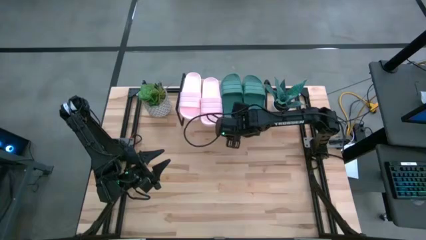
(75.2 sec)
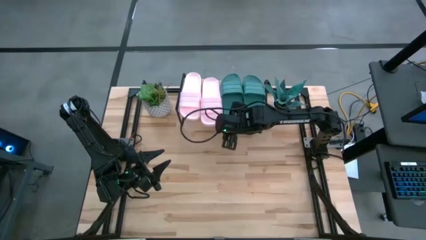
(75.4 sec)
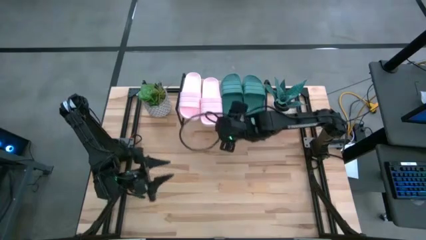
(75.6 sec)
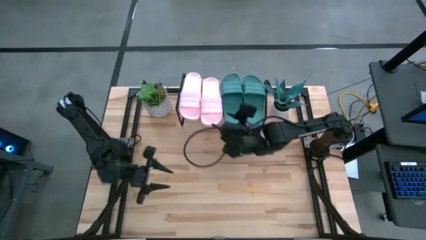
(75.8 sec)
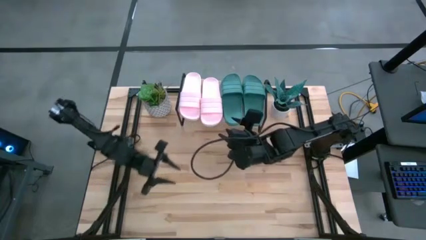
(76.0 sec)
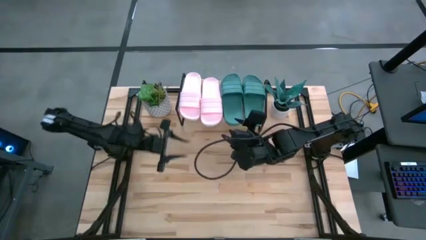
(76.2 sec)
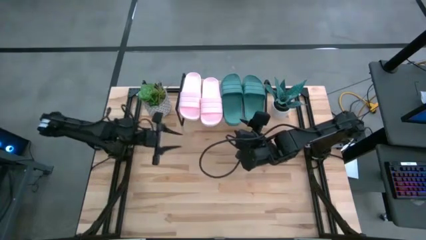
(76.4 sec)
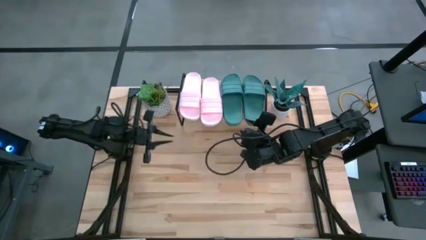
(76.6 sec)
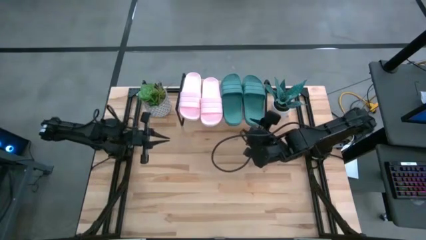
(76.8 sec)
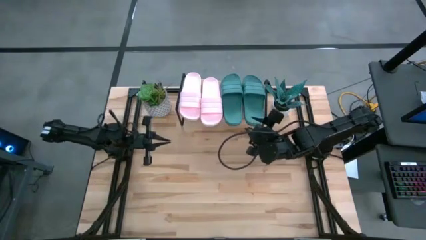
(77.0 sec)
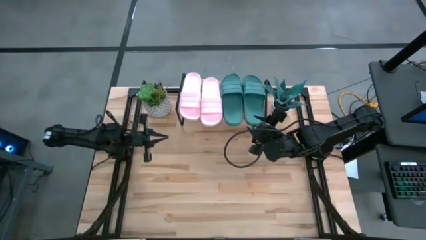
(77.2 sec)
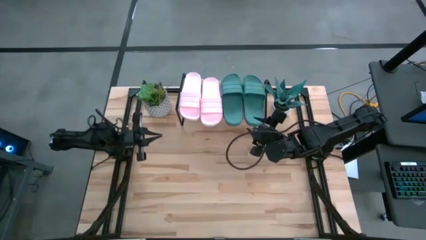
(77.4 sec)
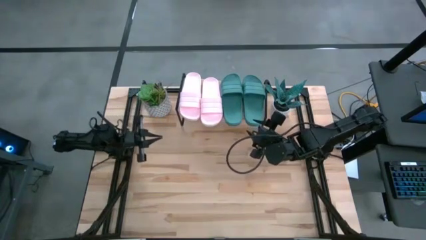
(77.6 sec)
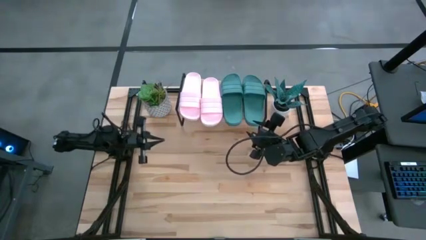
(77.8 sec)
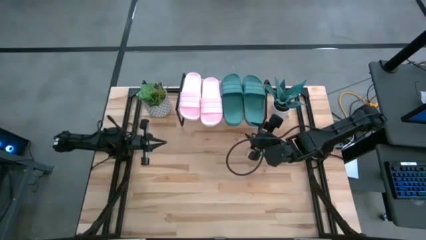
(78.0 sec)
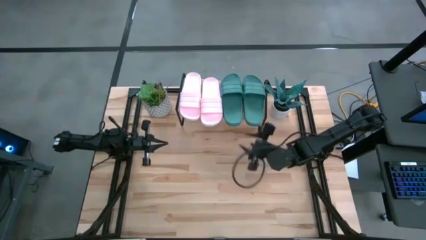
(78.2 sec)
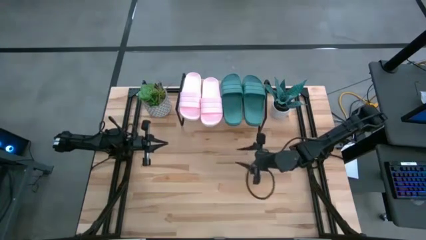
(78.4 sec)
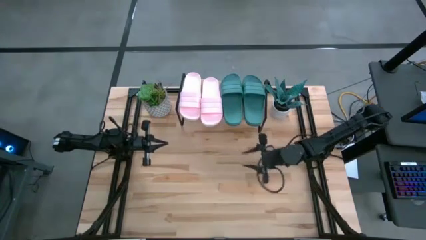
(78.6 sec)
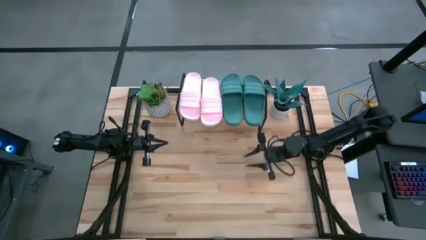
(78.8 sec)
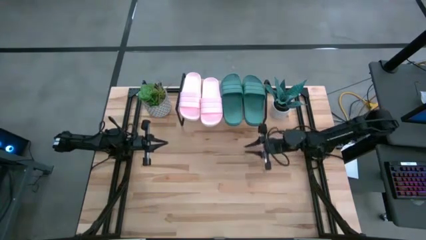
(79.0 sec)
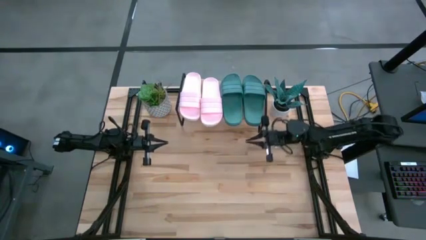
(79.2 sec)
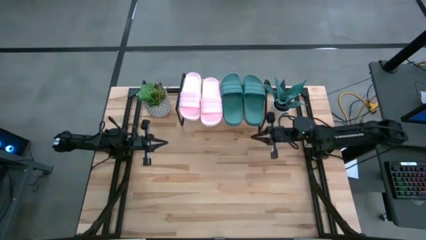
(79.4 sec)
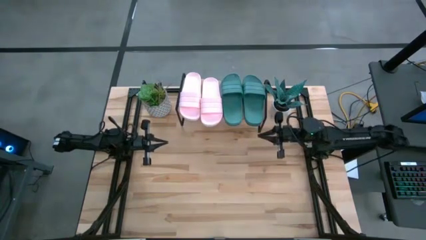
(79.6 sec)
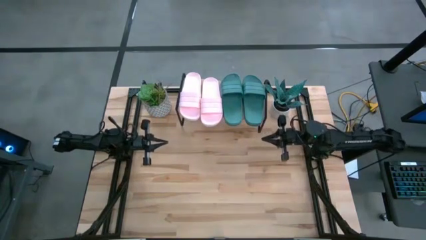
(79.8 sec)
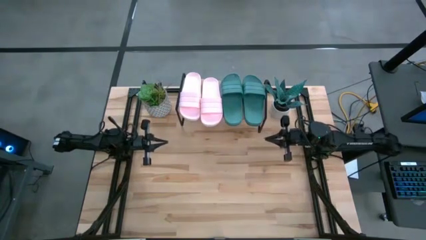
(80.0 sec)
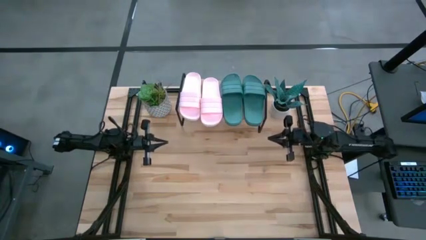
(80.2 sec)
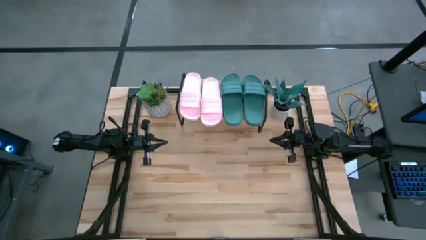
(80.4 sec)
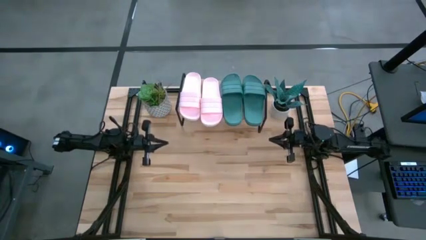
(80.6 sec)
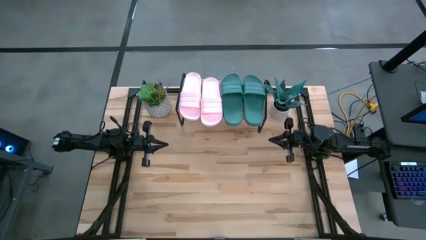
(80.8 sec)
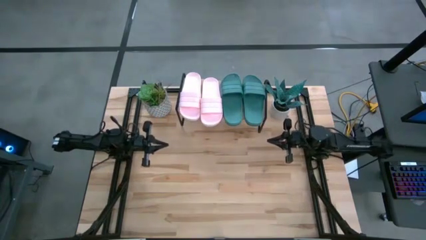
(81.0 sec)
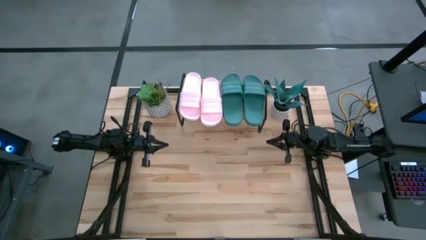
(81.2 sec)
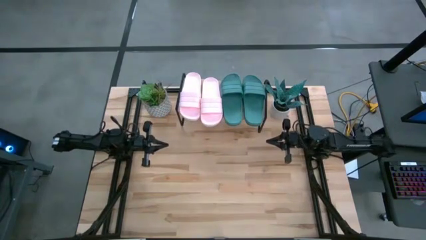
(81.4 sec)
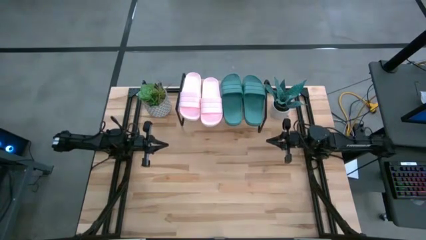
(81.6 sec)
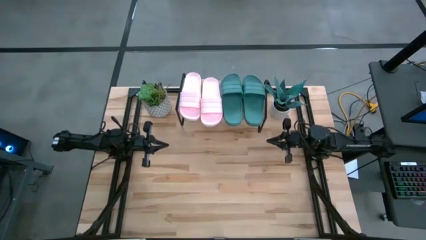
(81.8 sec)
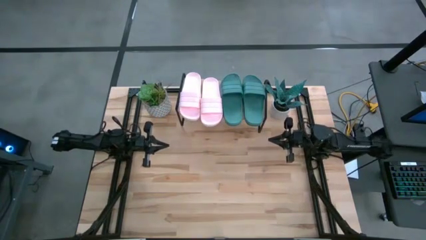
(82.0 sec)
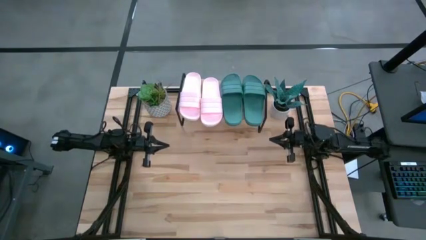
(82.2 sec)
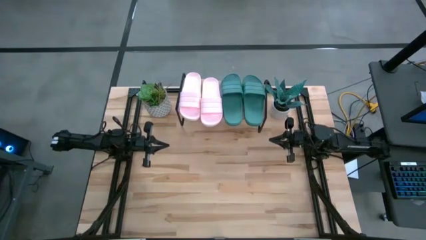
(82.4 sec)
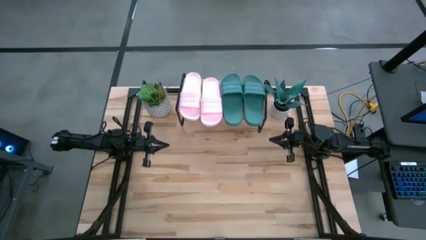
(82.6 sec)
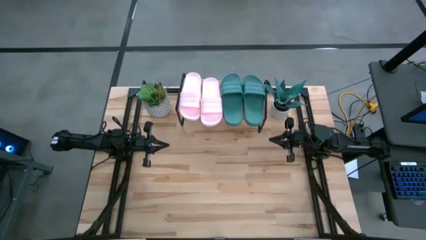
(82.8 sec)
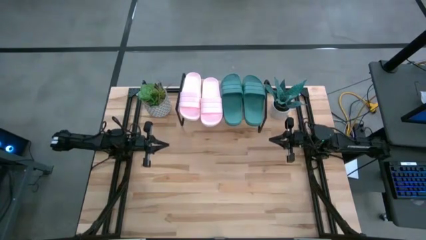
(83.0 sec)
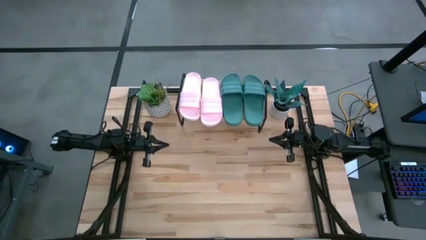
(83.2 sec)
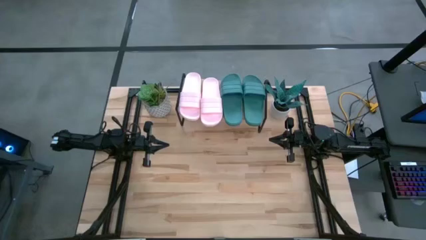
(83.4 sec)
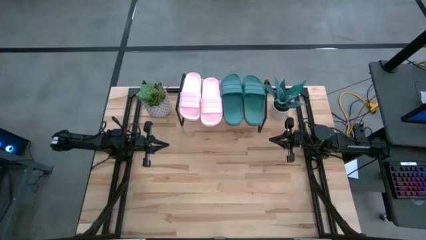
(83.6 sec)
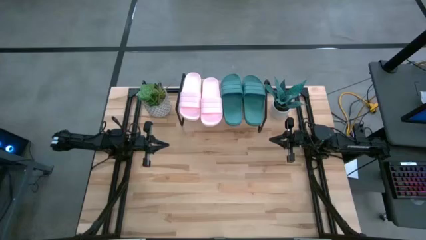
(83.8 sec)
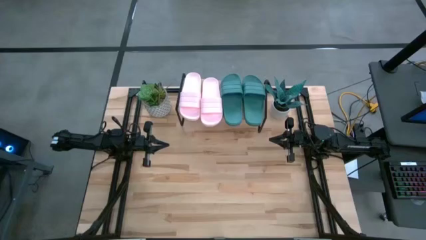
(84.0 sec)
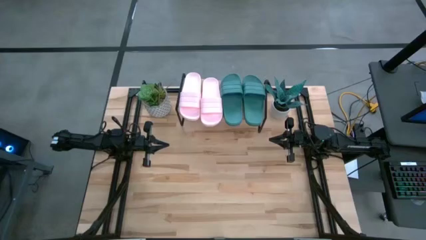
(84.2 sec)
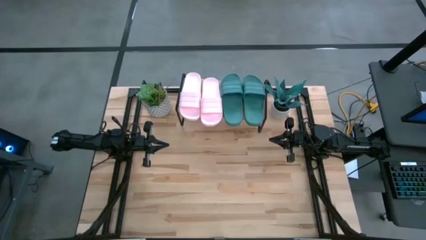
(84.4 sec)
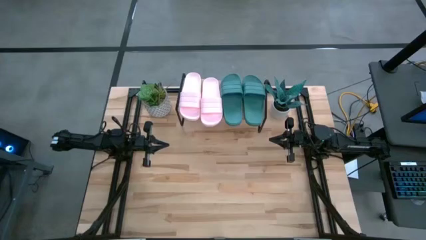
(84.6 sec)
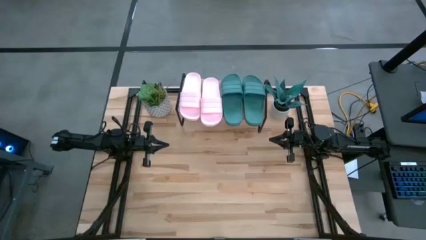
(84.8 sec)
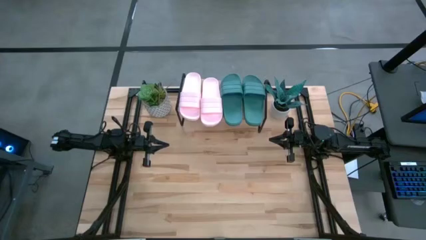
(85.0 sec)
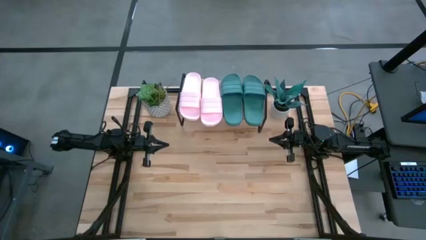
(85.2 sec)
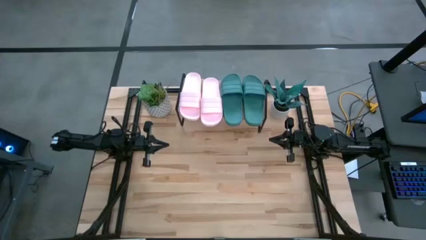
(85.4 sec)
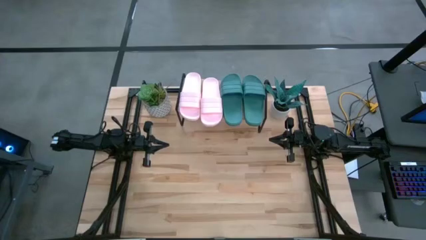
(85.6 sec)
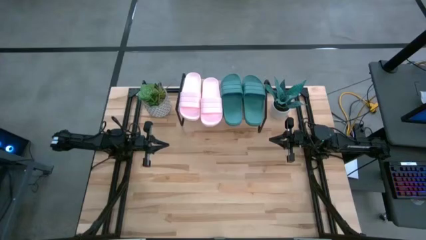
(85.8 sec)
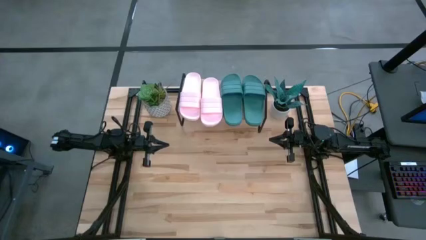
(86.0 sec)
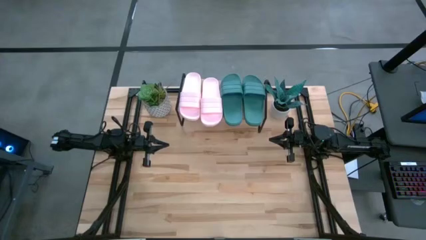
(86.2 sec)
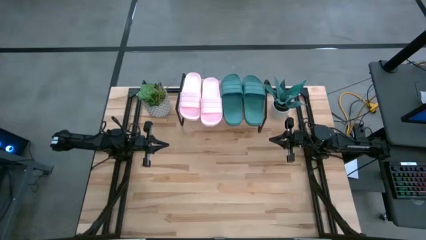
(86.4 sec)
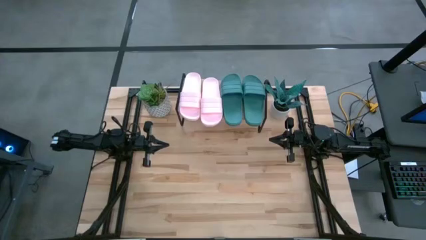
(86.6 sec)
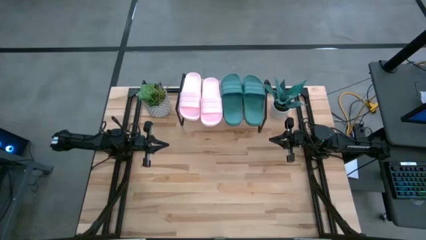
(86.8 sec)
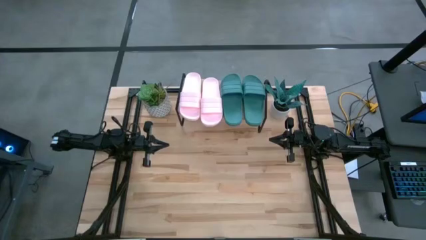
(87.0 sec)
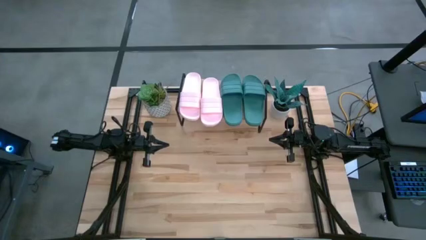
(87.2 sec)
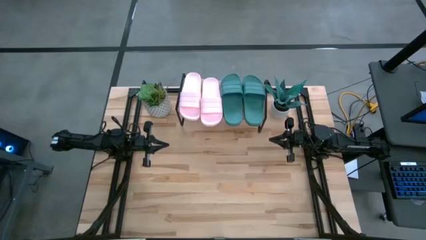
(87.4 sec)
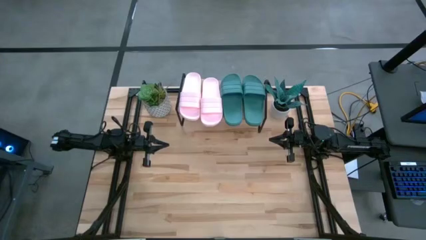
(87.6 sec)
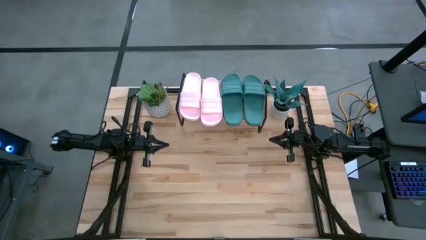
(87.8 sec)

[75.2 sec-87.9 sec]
Task: Pick and place slides into the shelf
Return to Home Position

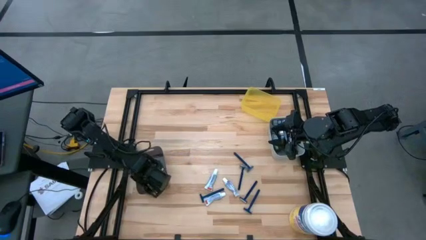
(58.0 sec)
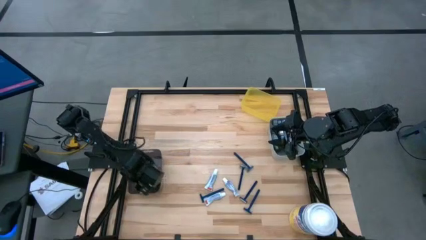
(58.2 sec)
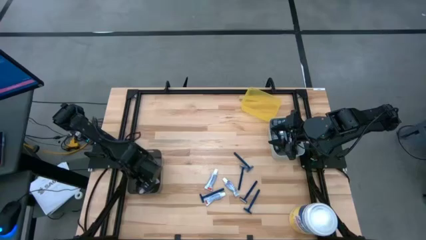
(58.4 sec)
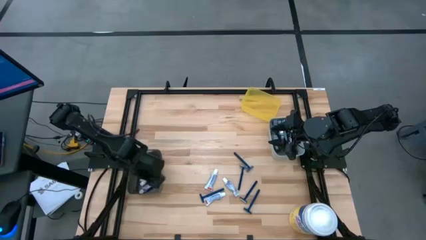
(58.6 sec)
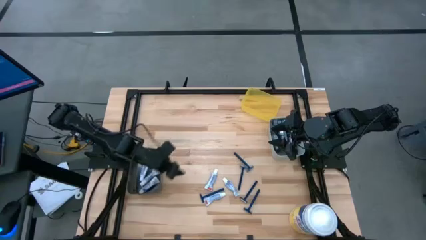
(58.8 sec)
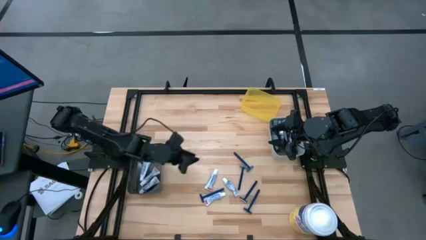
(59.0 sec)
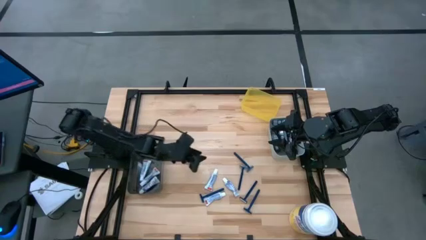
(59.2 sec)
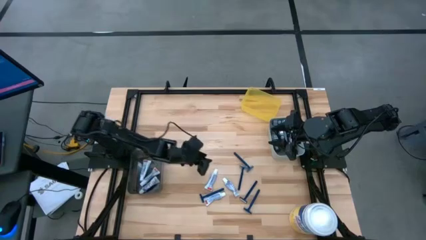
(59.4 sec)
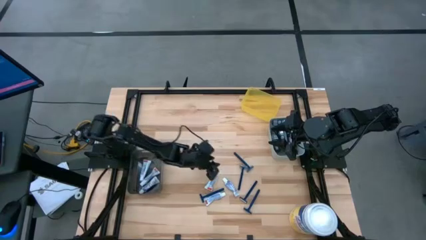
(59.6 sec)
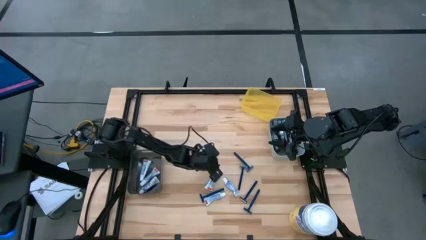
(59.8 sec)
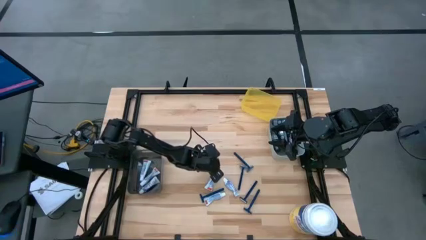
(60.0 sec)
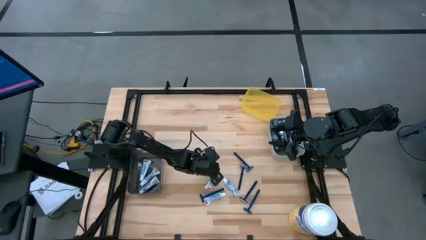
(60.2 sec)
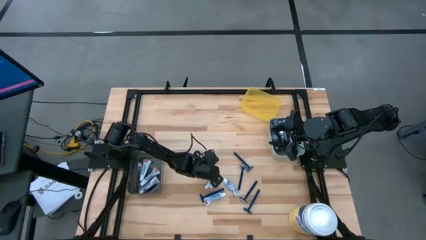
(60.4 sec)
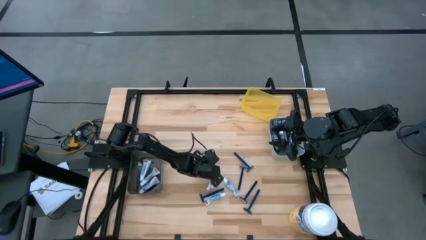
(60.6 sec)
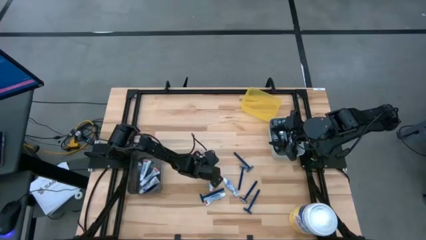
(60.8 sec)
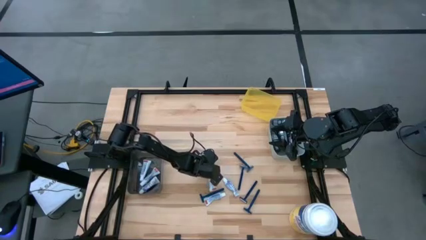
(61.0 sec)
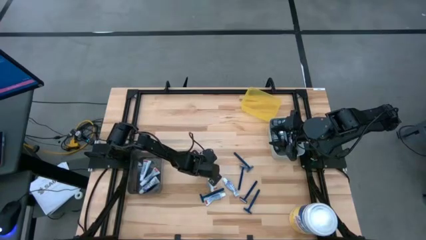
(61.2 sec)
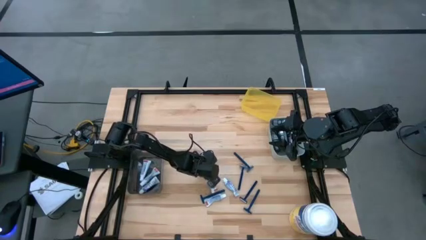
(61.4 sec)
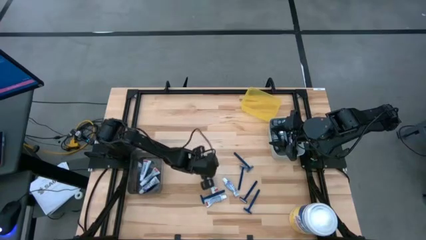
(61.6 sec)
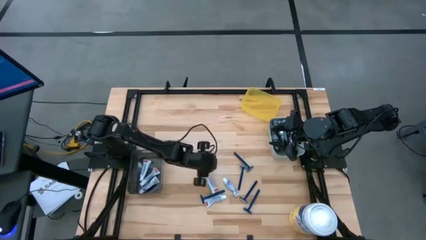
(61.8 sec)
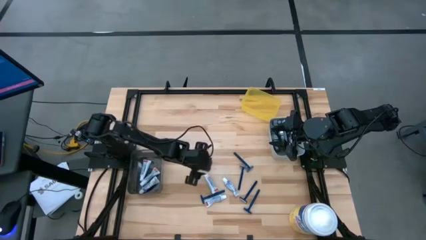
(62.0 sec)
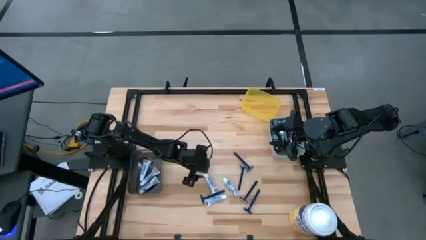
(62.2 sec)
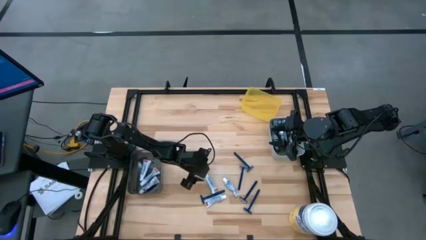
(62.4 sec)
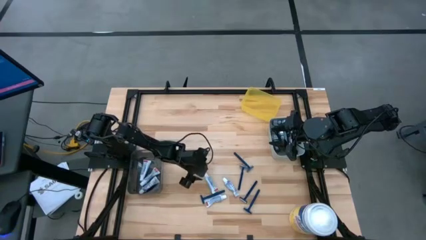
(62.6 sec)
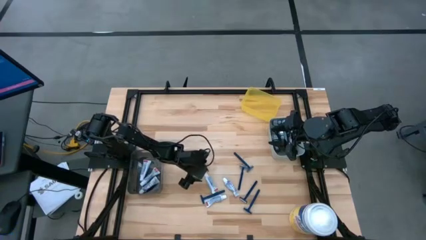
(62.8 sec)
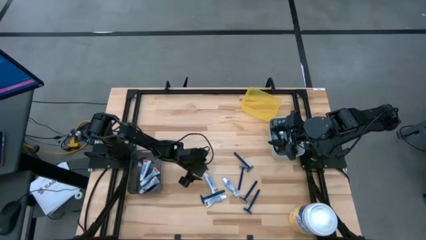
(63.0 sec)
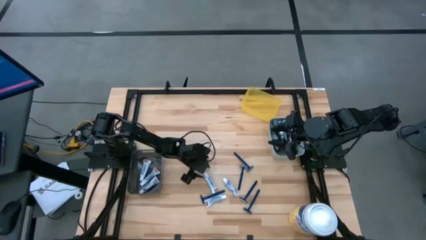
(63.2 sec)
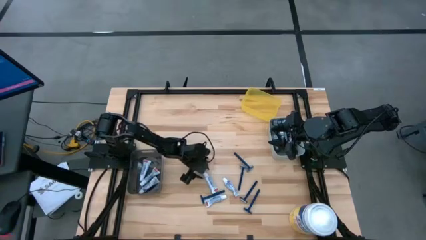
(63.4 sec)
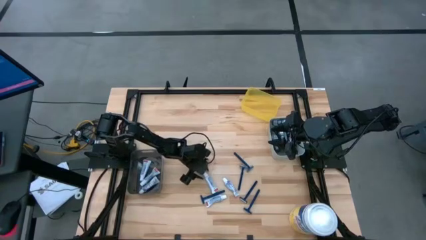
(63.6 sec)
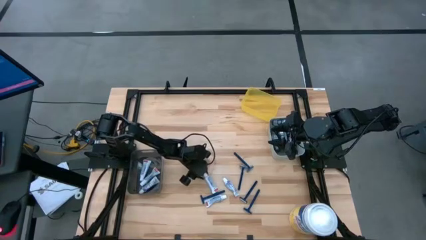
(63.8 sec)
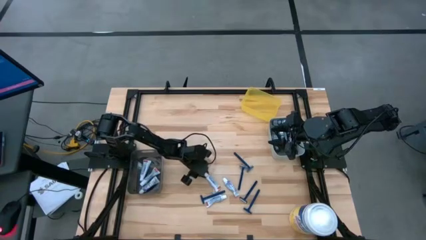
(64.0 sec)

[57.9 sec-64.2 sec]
Task: Pick & Place Travel size toiletries
Put the white toothpaste into the black bin
